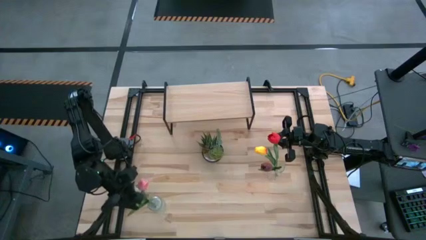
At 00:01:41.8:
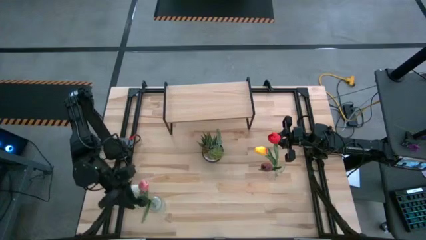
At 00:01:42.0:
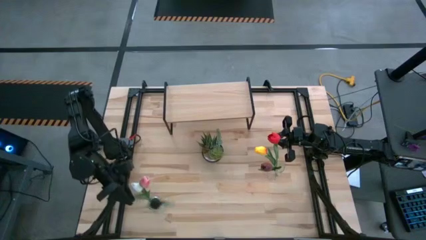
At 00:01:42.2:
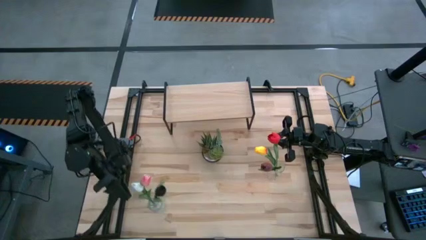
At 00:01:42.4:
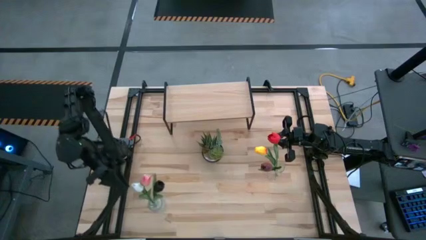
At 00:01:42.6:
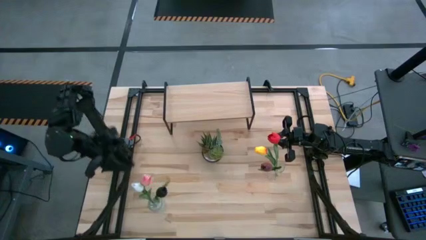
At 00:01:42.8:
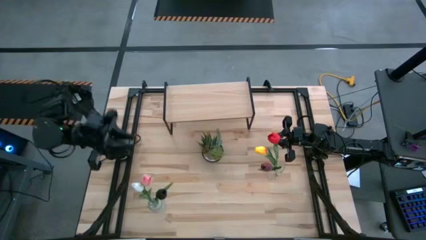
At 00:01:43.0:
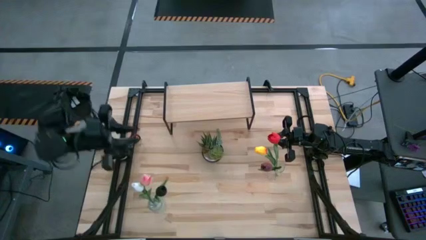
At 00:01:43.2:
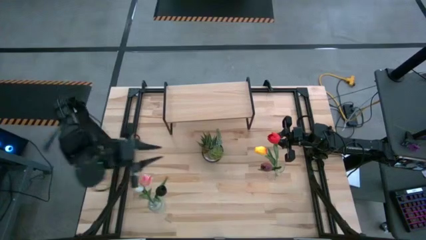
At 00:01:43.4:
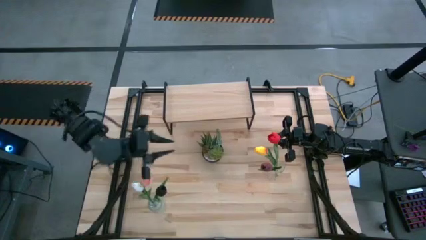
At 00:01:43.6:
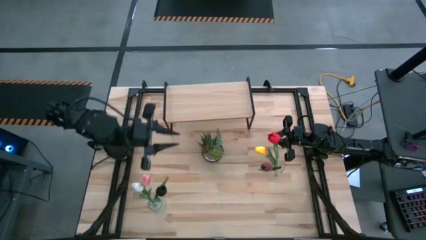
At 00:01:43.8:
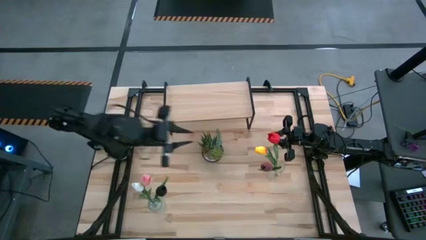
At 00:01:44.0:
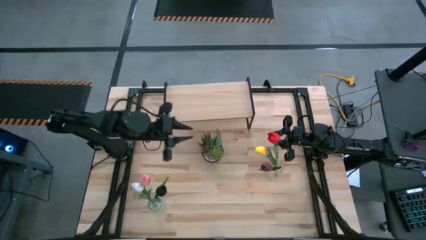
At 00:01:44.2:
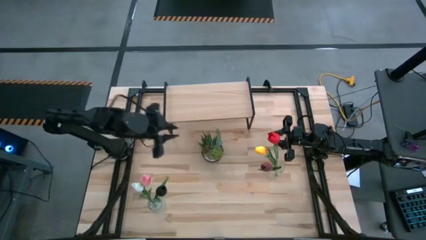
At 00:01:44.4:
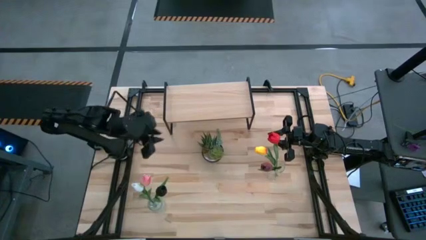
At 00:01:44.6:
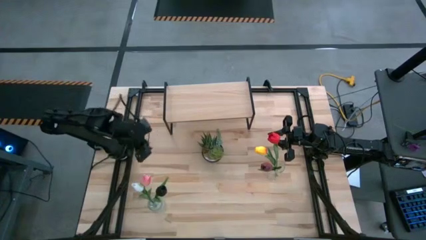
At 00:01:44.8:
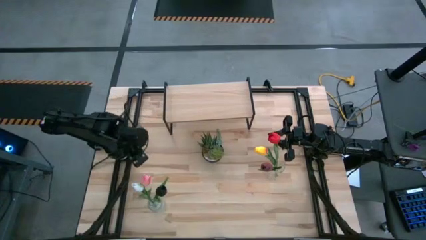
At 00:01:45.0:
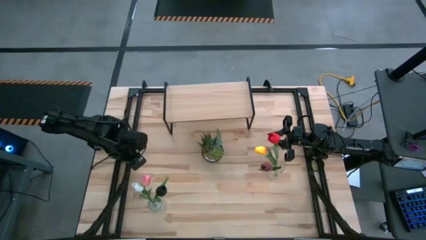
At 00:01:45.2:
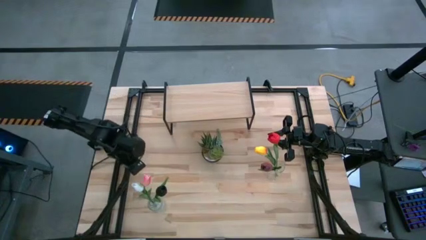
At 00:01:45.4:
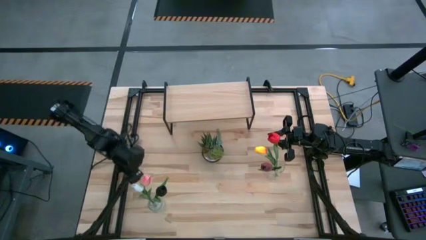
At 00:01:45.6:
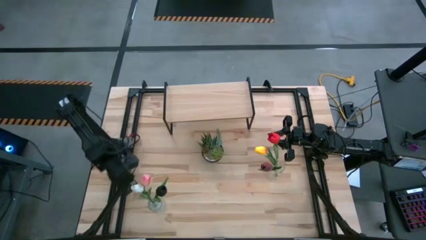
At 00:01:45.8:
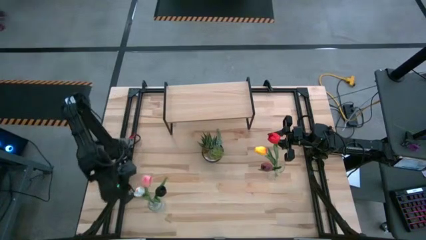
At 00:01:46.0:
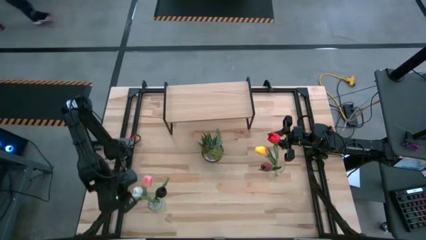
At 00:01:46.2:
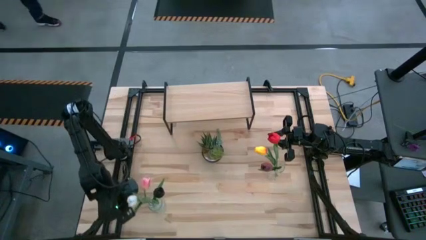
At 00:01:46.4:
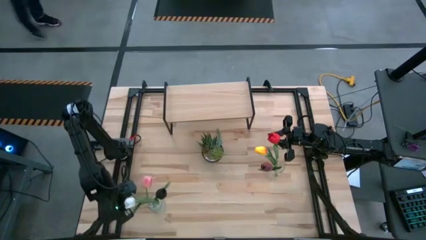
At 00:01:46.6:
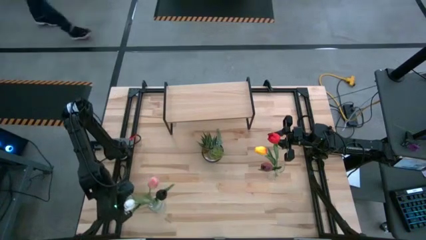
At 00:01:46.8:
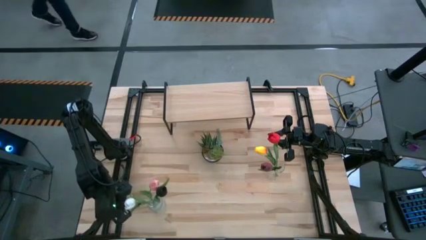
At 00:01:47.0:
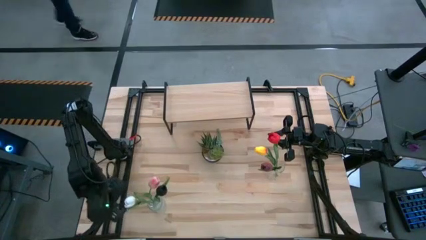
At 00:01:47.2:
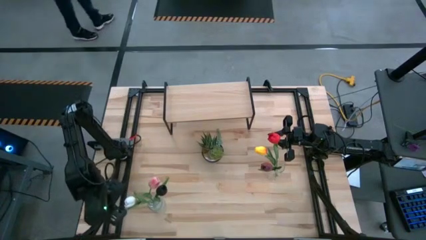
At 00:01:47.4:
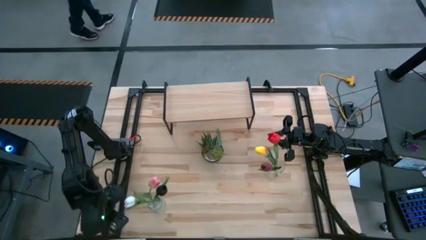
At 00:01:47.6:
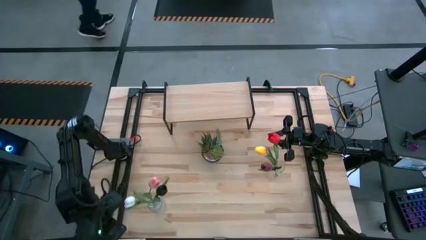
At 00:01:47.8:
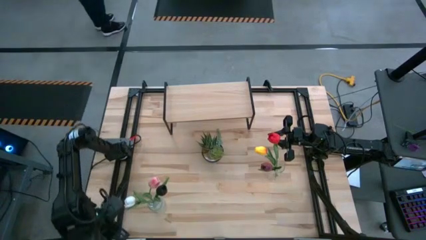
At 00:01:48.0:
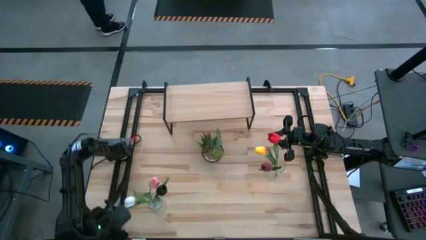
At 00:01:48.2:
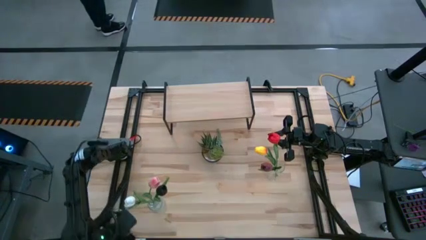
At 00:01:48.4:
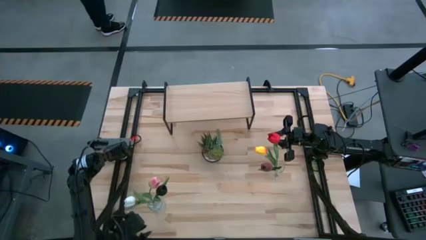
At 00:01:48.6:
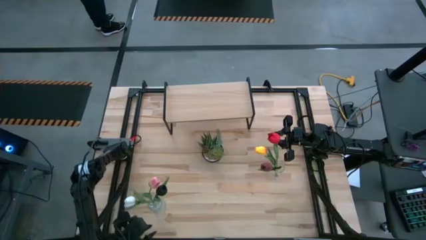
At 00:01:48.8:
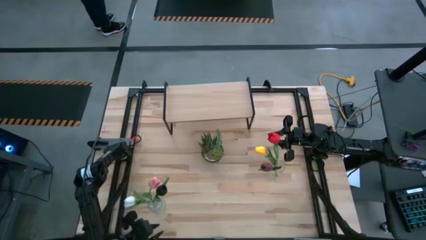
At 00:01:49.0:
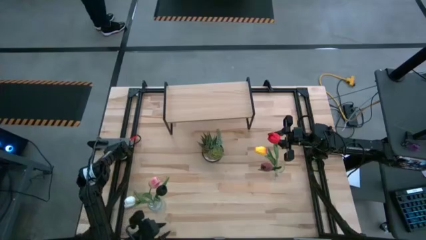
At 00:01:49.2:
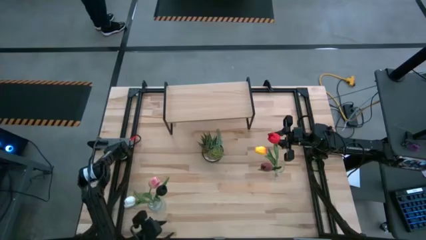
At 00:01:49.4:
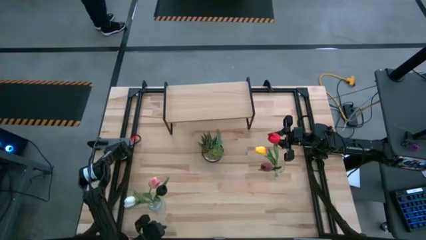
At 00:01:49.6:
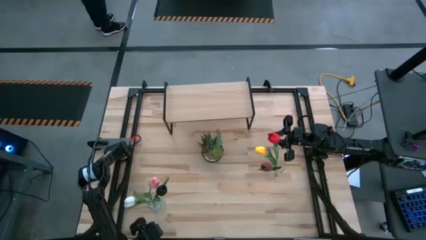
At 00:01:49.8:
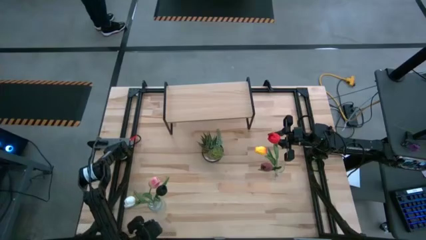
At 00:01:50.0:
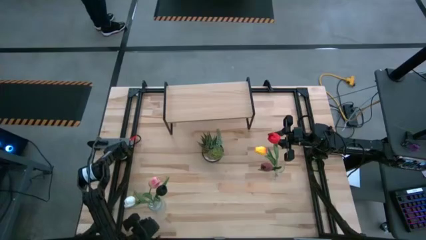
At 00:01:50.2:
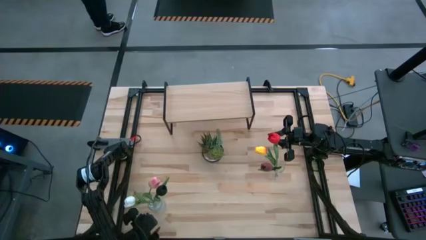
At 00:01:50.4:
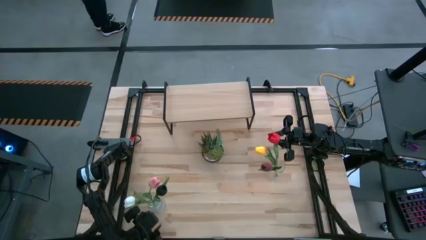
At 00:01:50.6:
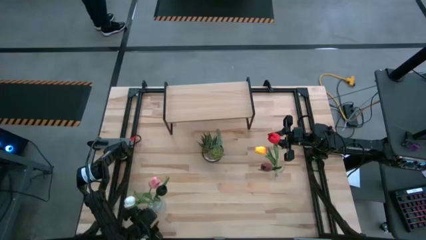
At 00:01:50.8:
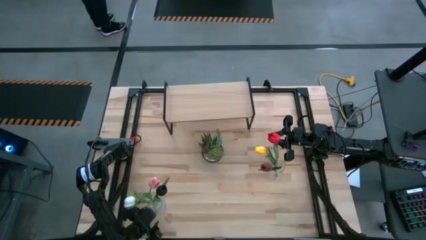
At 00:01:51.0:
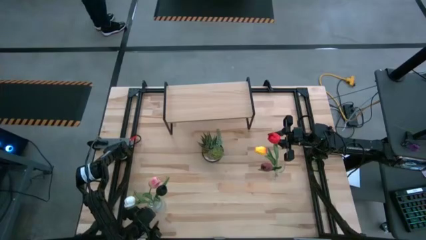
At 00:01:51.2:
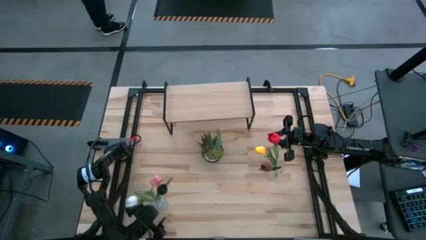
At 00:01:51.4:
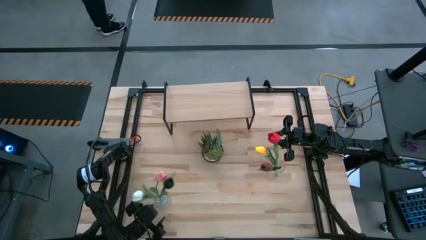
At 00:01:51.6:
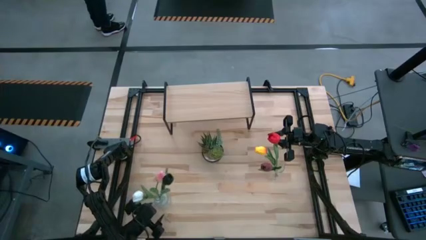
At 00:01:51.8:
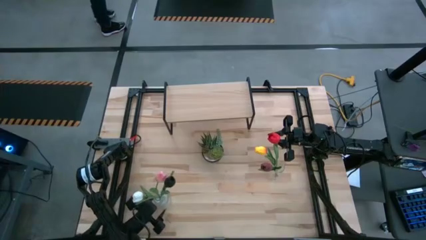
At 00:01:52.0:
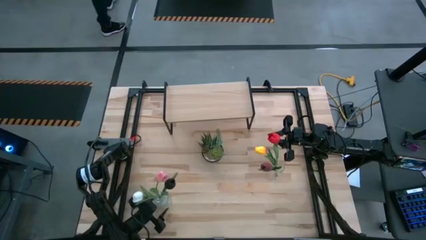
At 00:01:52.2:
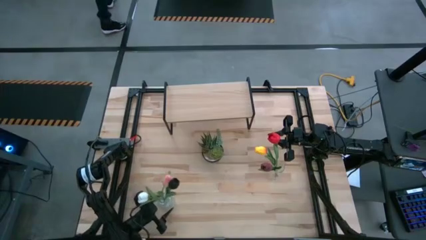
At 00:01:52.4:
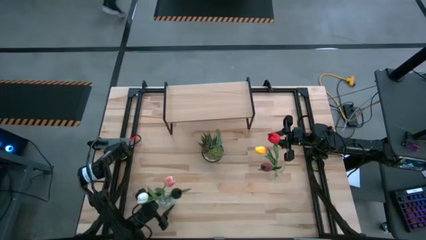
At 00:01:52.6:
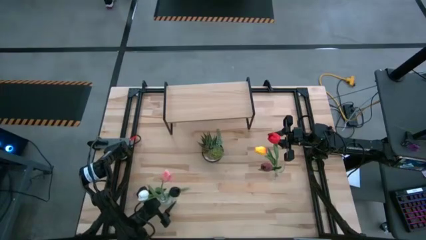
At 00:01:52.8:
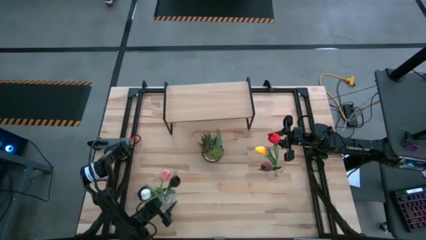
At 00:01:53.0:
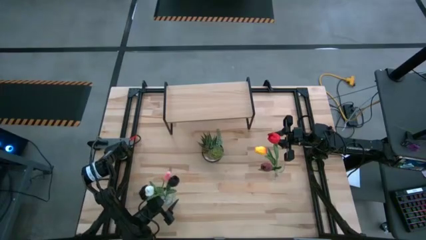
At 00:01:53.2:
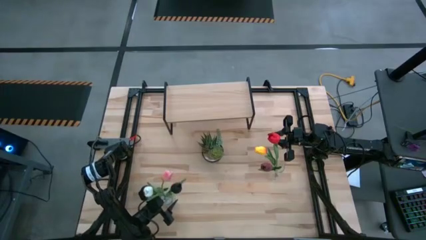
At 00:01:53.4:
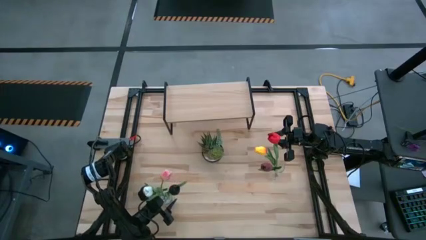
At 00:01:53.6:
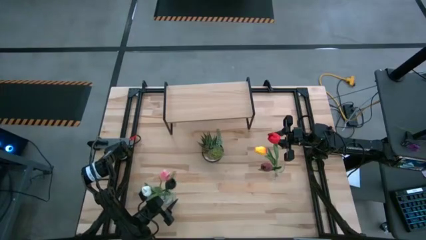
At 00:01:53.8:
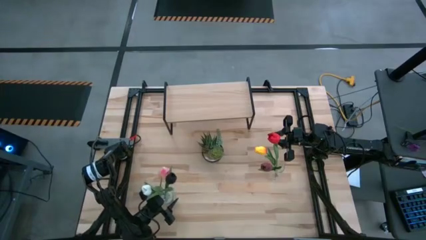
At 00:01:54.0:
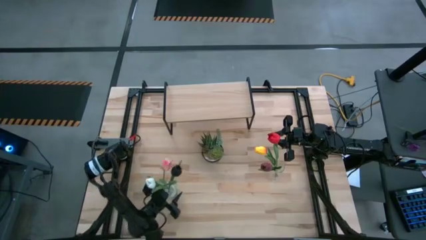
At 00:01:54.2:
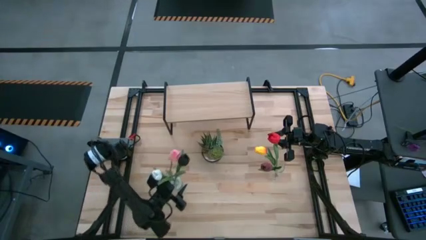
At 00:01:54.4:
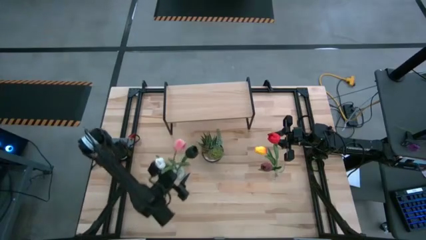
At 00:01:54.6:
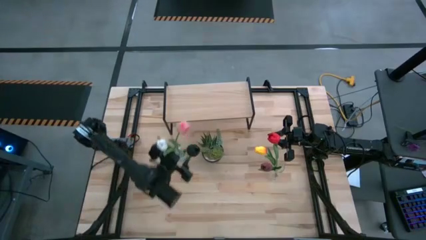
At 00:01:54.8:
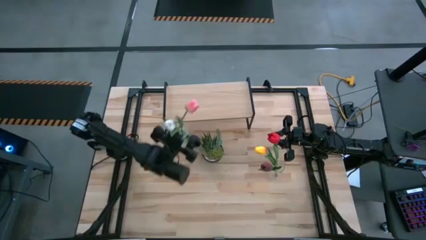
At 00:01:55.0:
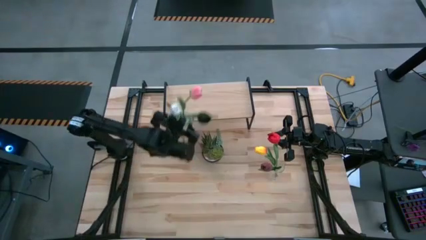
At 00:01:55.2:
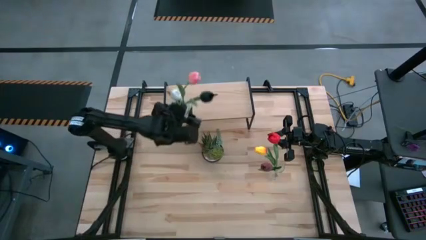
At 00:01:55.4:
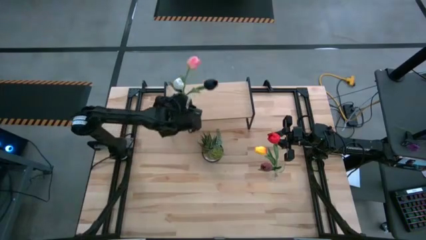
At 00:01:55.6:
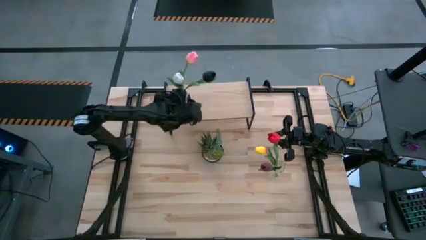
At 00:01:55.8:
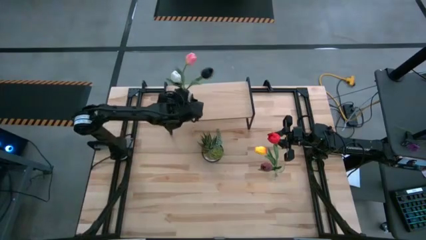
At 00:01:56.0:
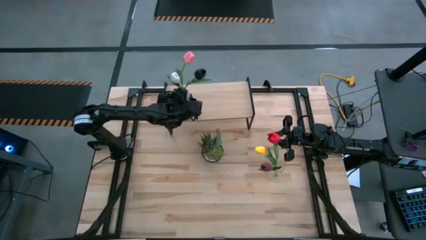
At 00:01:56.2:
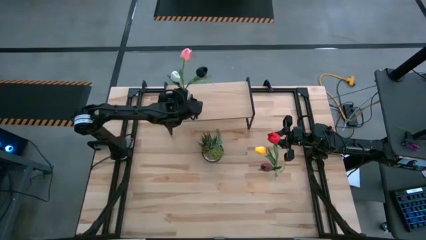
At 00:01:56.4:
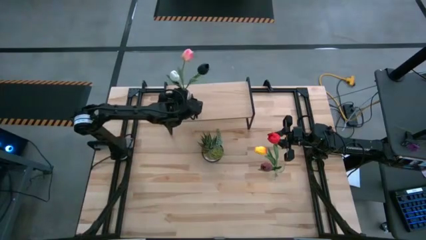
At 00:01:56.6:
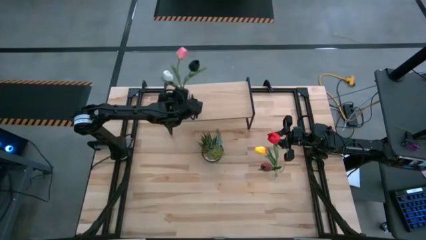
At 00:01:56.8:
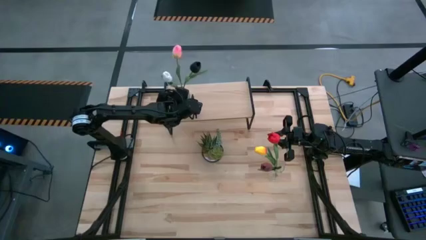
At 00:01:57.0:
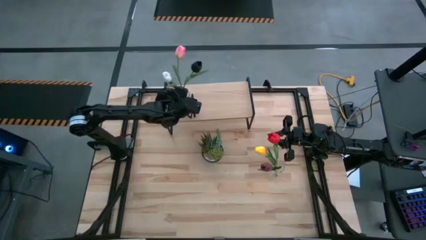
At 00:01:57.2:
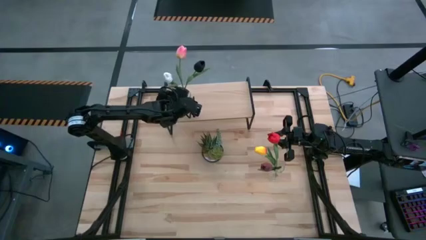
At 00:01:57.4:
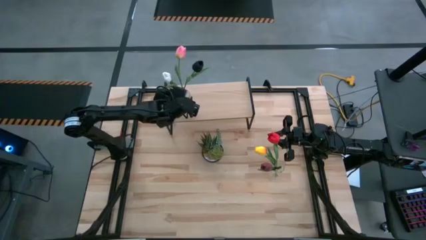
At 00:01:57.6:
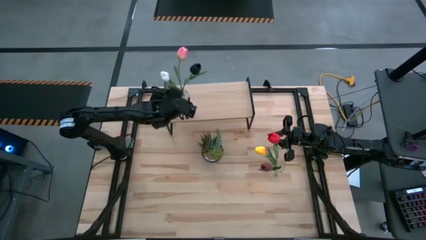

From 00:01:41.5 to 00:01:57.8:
Task: Pick and place flowers into a vace then onto a shelf
Put the left transparent vase with the flowers on the shelf
